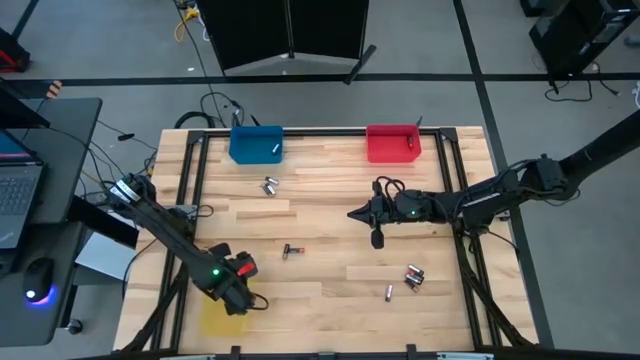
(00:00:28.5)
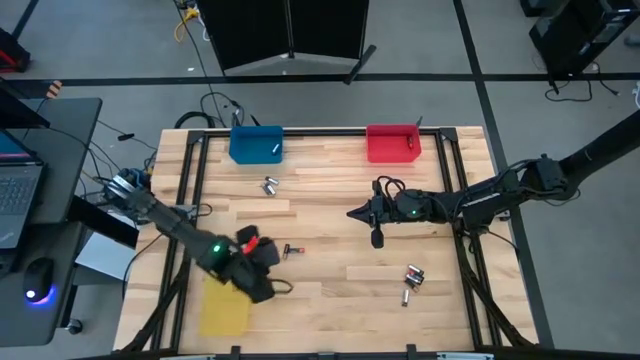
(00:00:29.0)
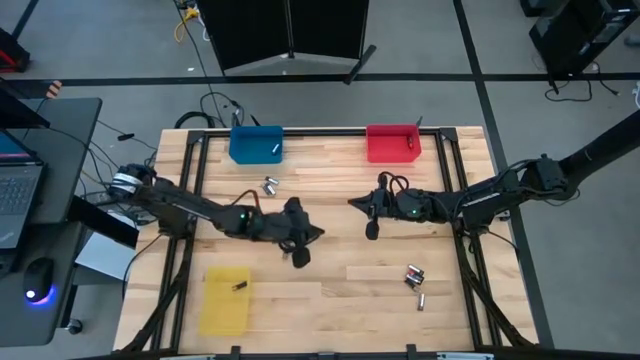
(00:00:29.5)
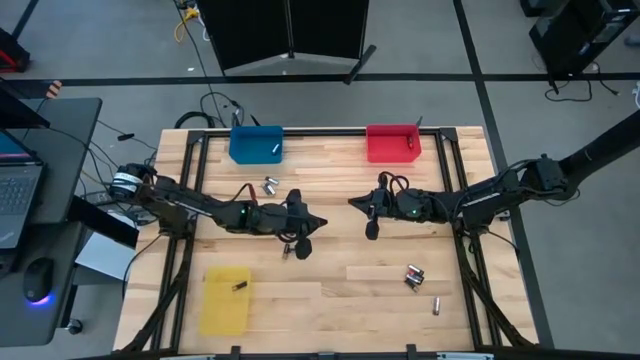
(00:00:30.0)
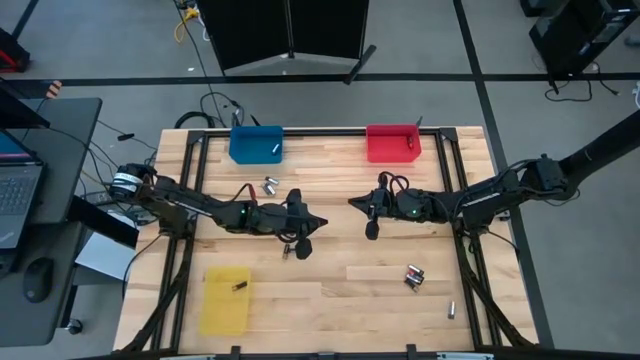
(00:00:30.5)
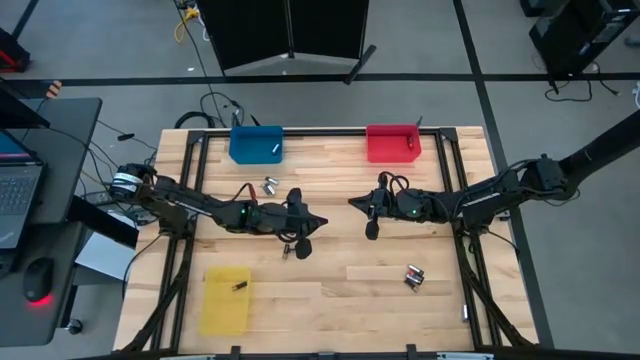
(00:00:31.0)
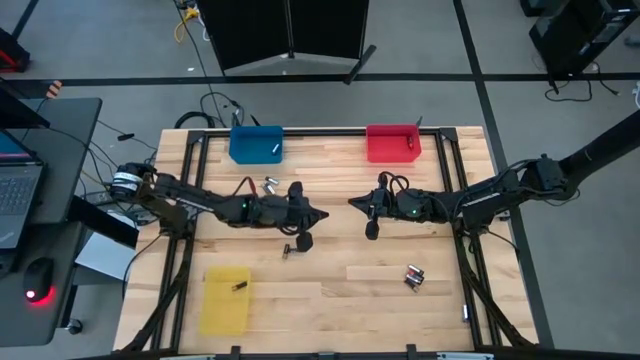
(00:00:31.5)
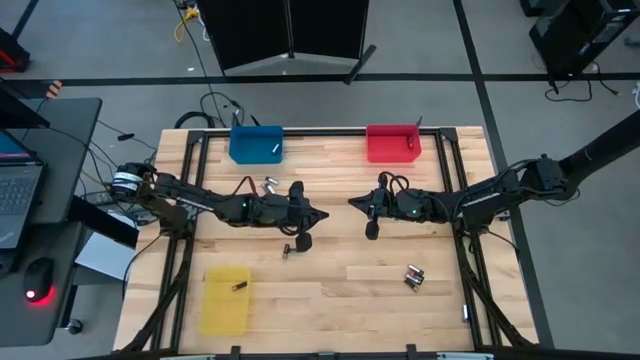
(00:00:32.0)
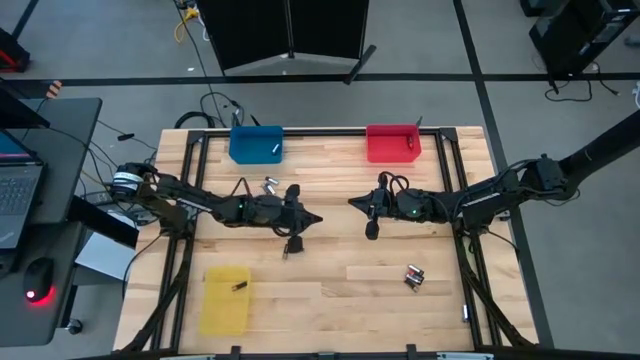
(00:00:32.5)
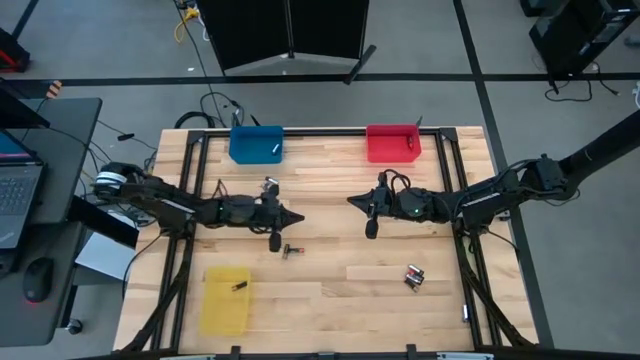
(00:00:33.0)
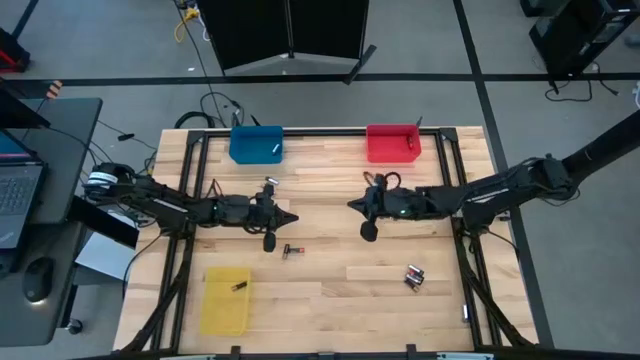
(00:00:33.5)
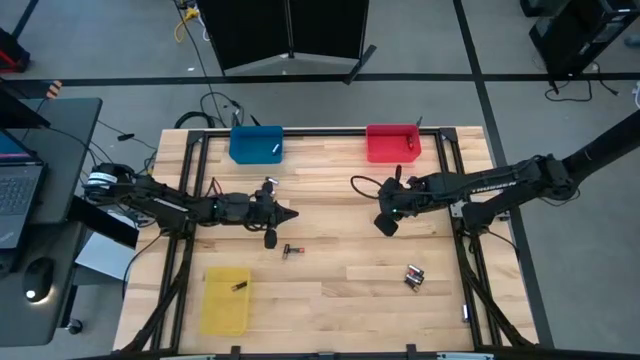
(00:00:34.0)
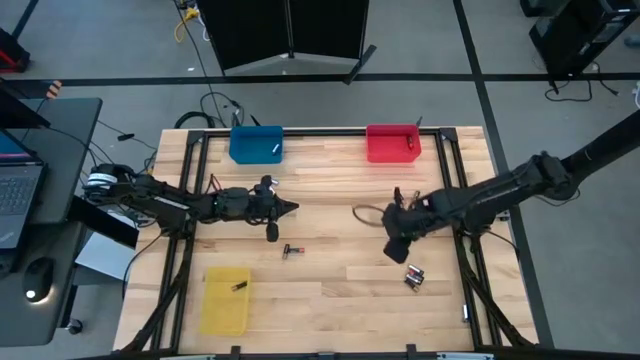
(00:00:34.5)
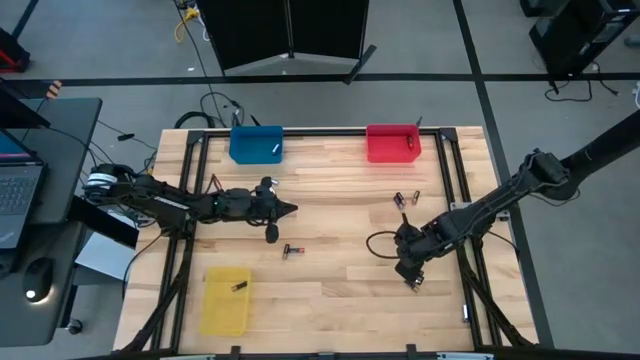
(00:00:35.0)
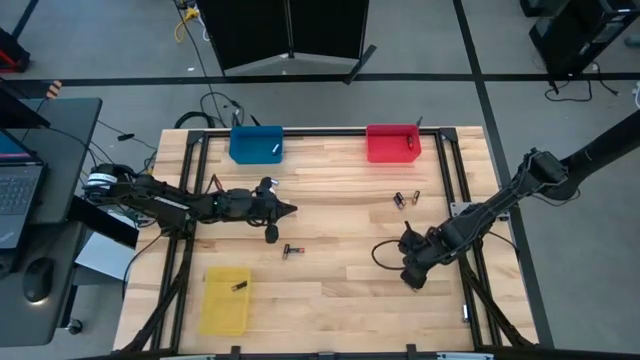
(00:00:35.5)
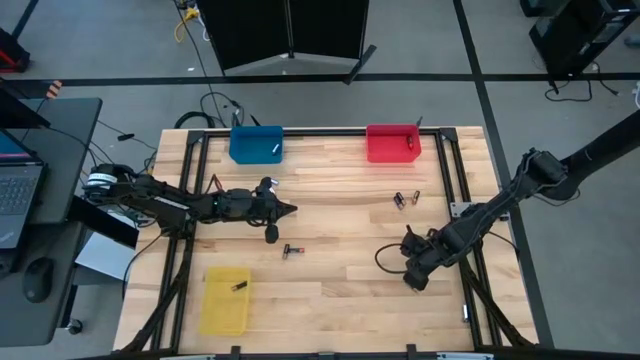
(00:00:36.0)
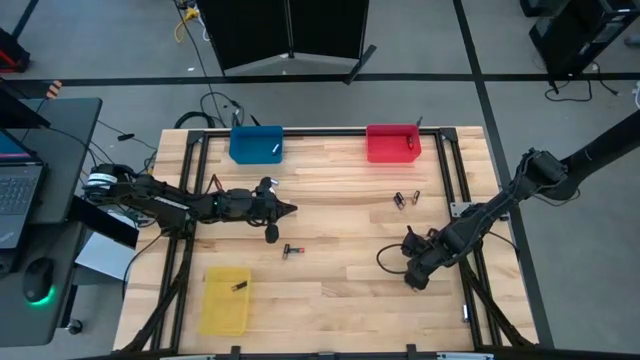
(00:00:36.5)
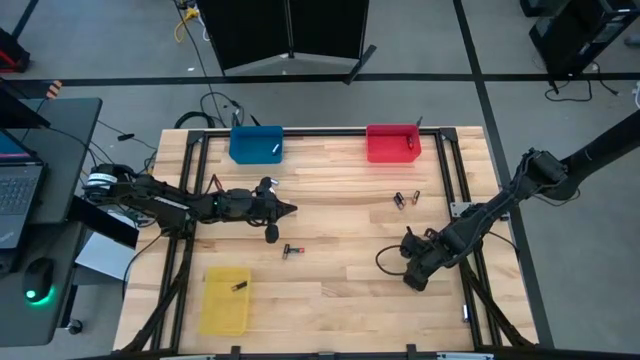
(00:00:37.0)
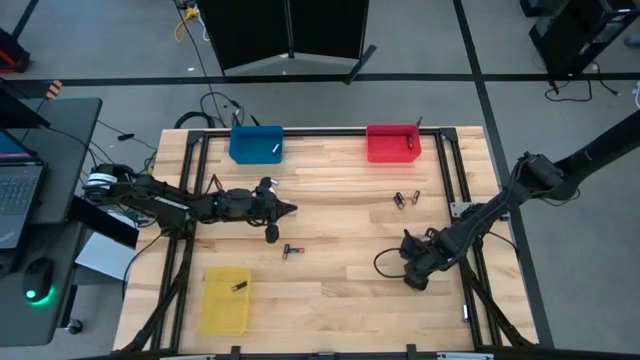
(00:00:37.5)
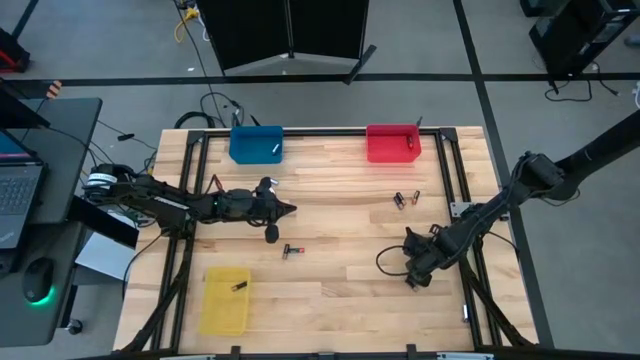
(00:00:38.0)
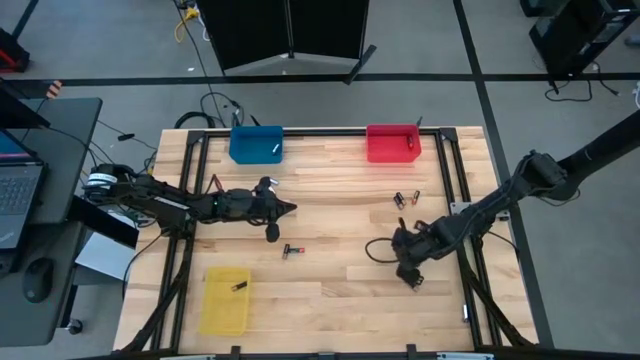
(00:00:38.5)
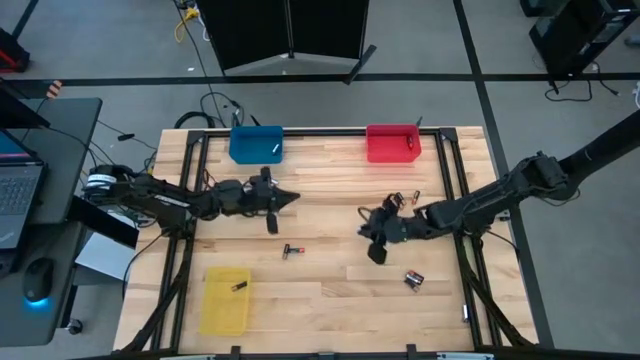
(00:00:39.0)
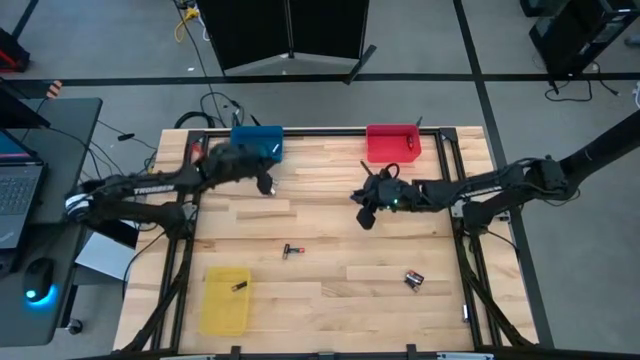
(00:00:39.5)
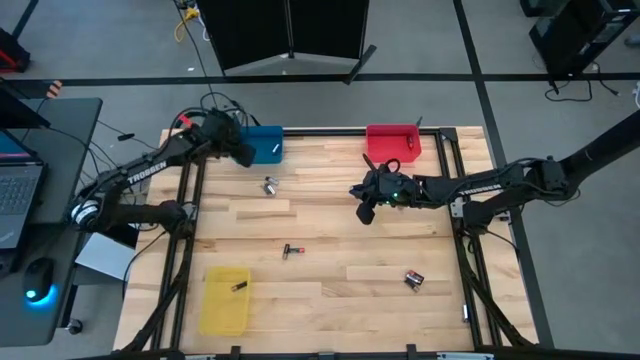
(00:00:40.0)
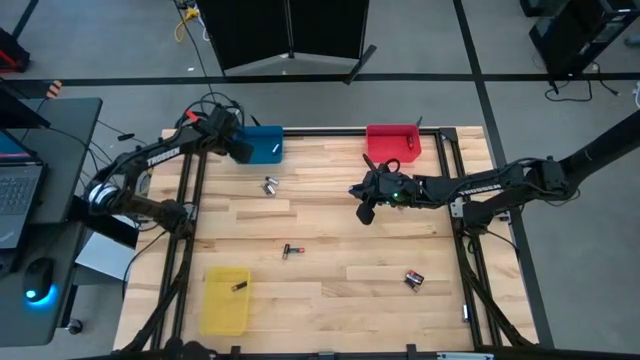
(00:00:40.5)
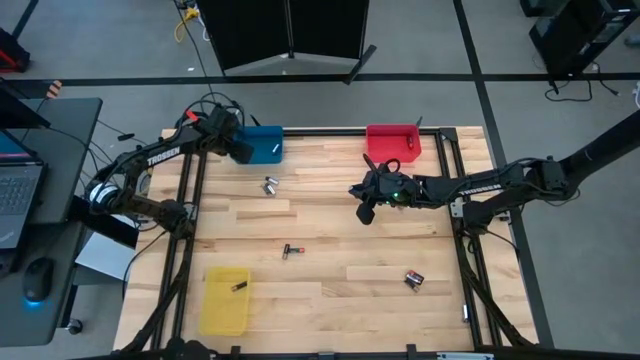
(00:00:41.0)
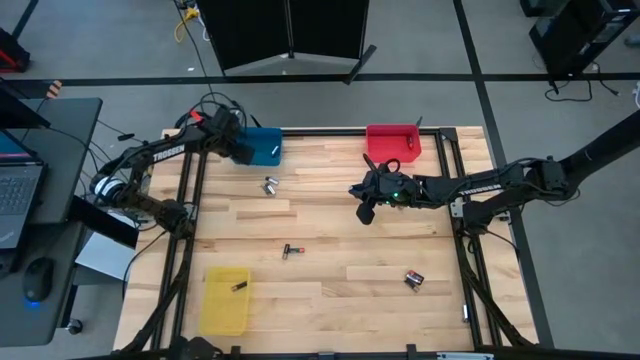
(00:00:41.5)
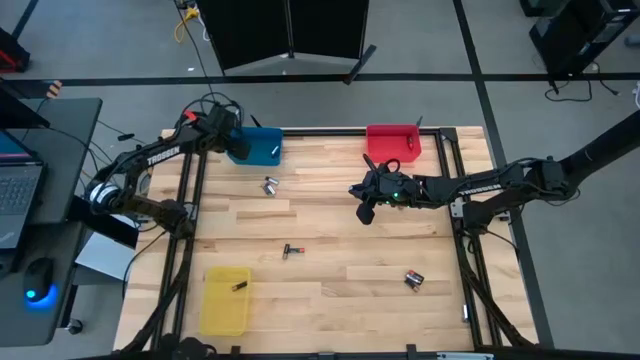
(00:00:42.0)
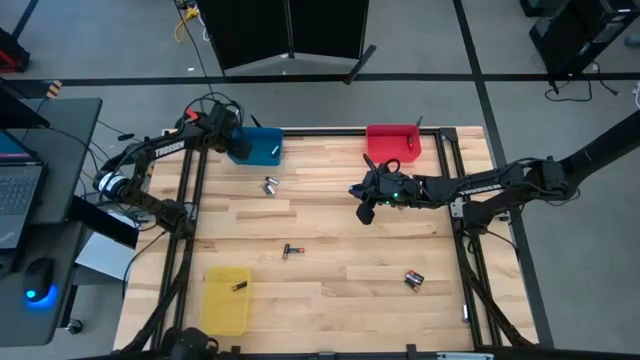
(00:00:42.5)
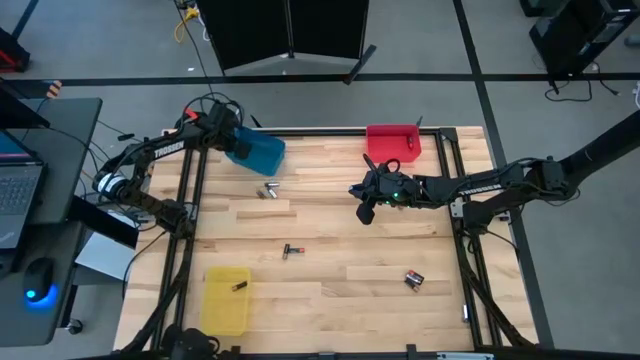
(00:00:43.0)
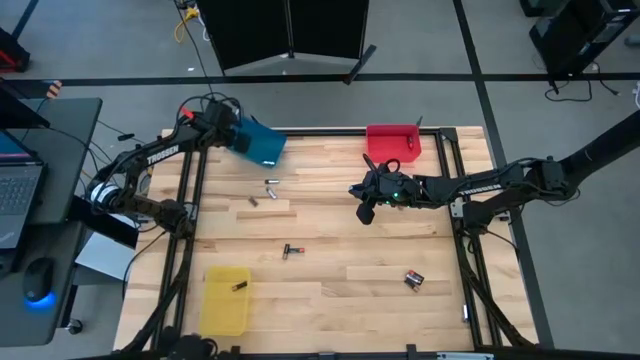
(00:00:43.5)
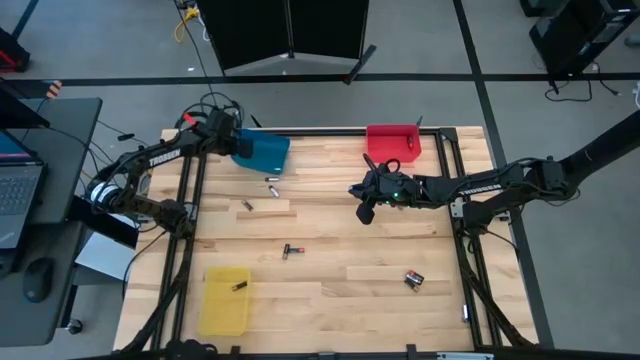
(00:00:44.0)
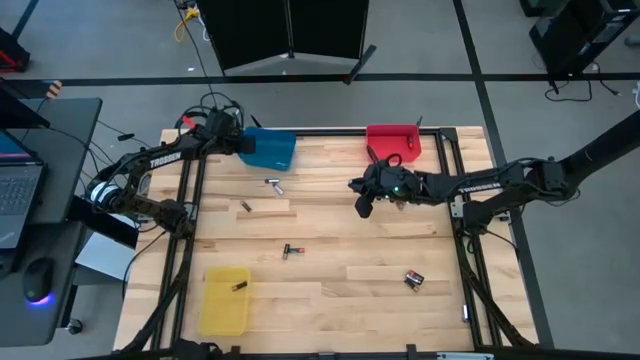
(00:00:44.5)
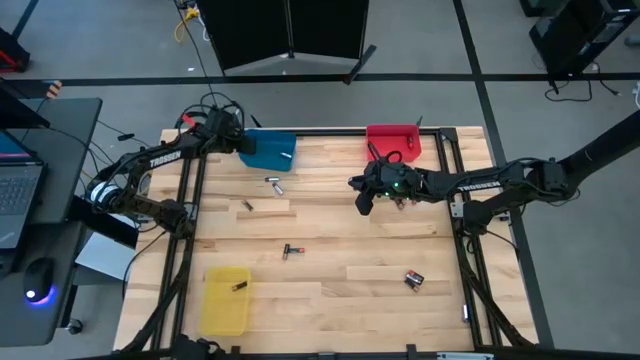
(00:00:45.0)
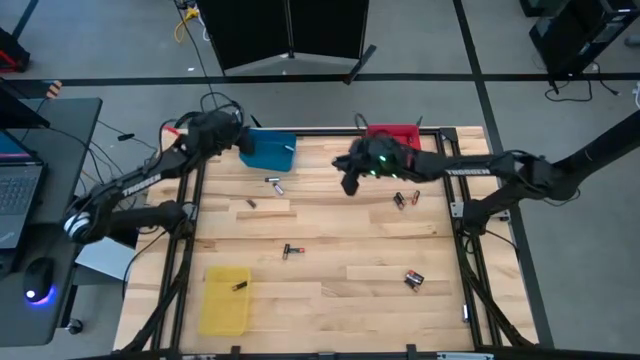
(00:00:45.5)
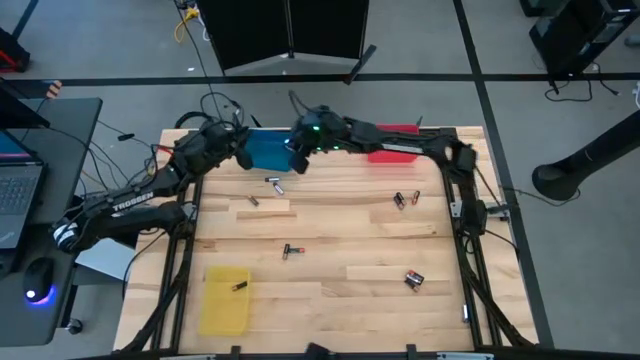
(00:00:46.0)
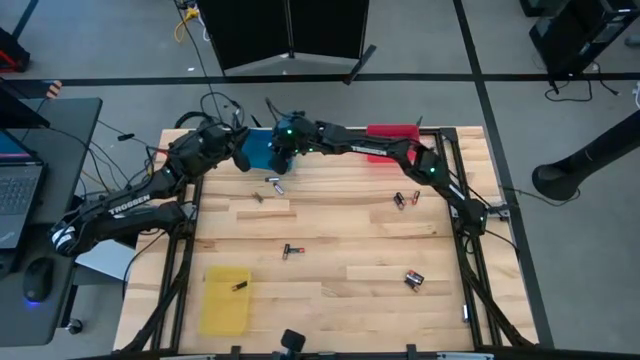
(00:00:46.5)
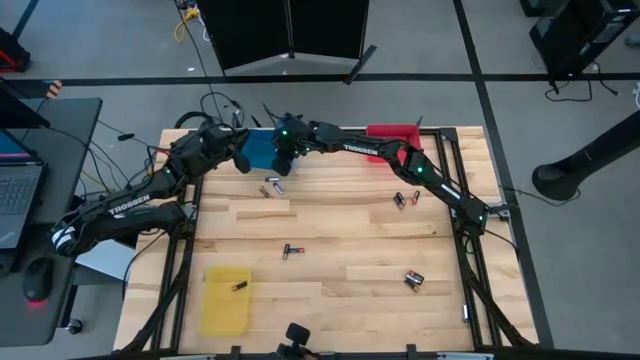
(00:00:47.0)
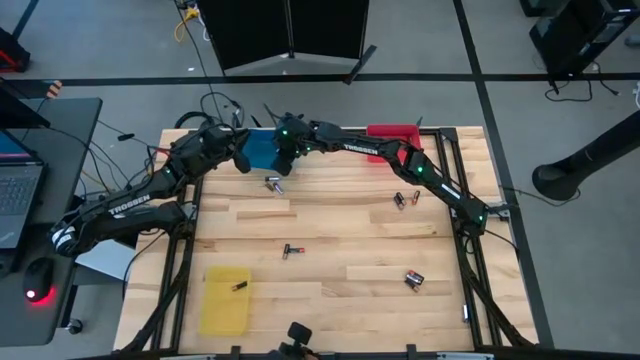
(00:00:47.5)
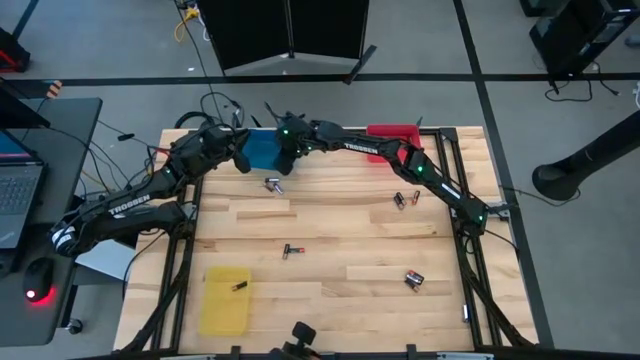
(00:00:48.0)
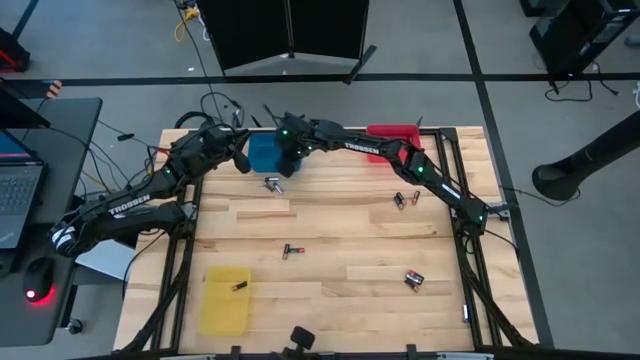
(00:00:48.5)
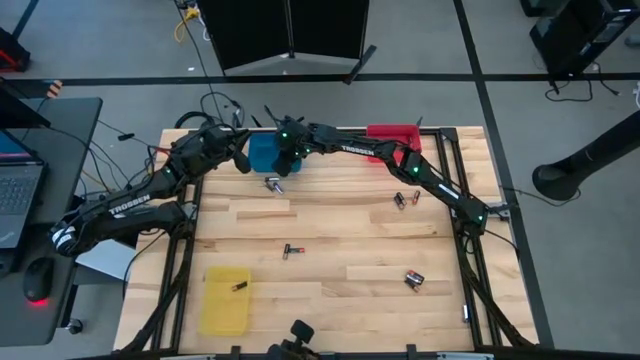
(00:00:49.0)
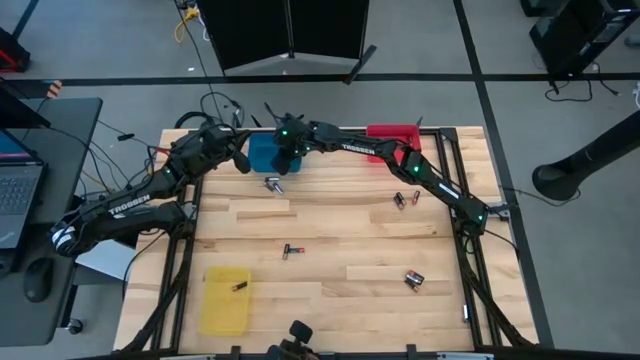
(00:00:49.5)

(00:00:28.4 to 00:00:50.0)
Task: Sort batteries
Put the silver battery into the blue bin
